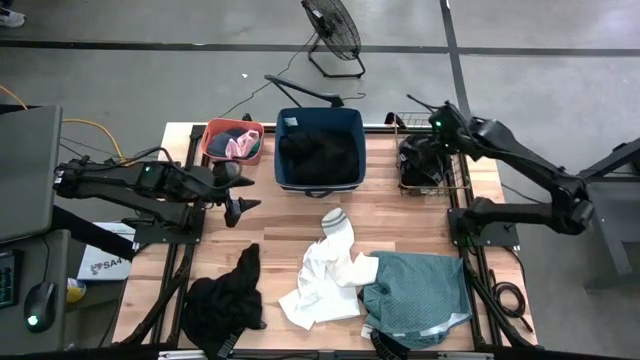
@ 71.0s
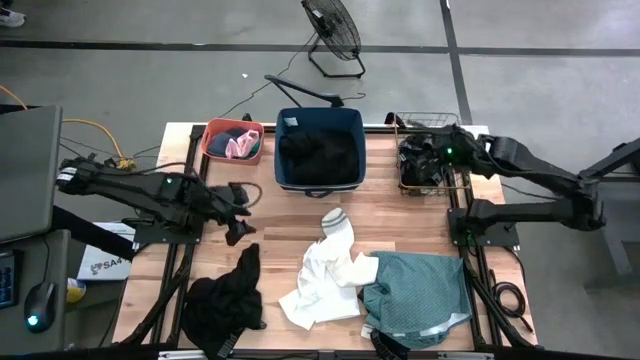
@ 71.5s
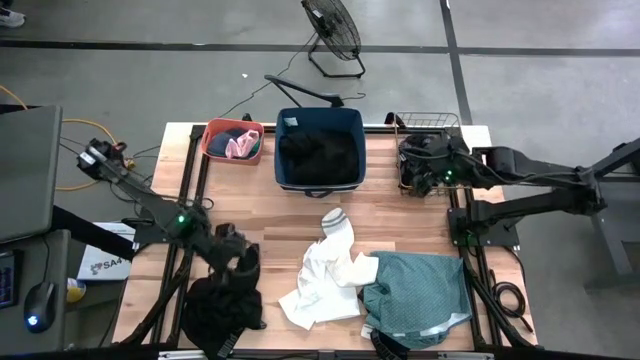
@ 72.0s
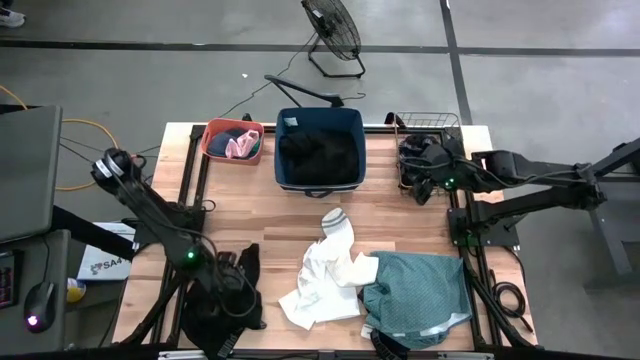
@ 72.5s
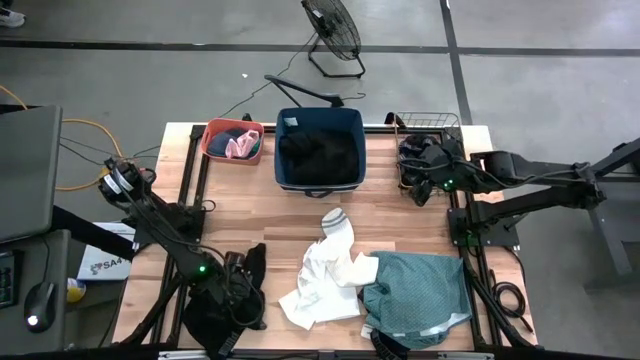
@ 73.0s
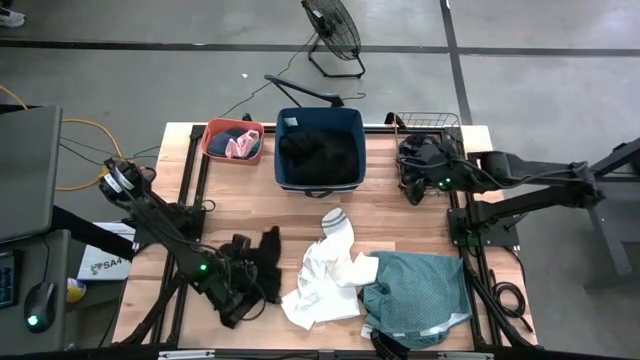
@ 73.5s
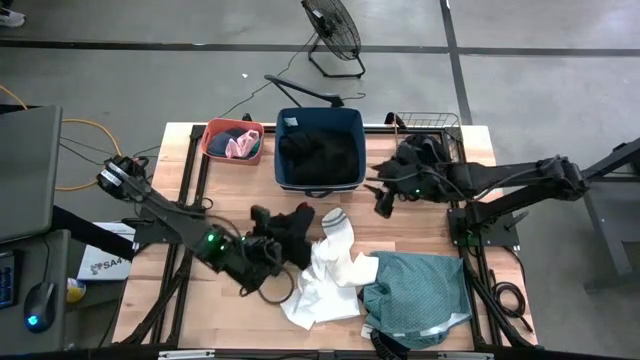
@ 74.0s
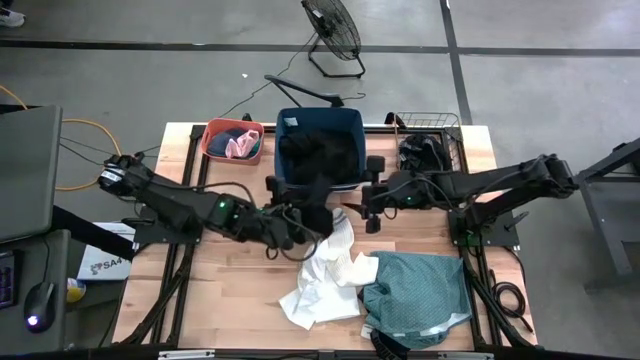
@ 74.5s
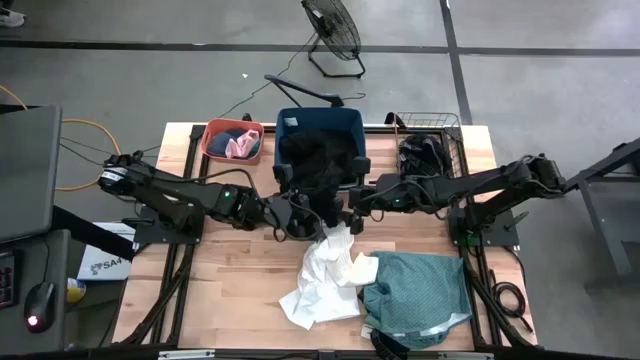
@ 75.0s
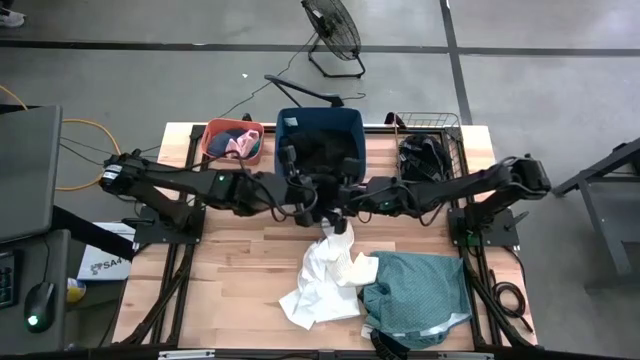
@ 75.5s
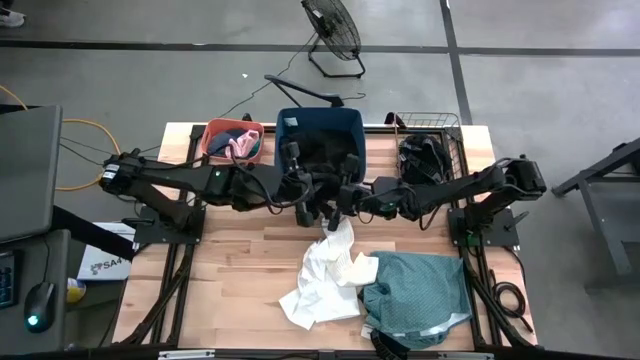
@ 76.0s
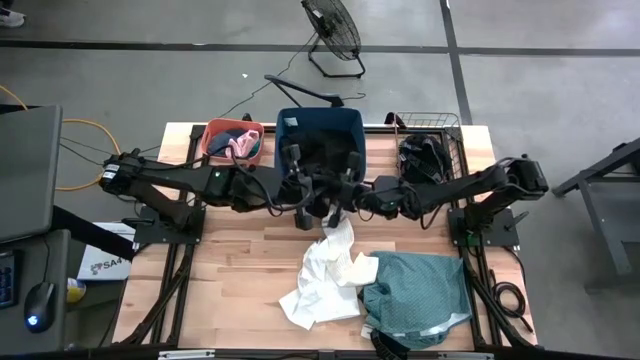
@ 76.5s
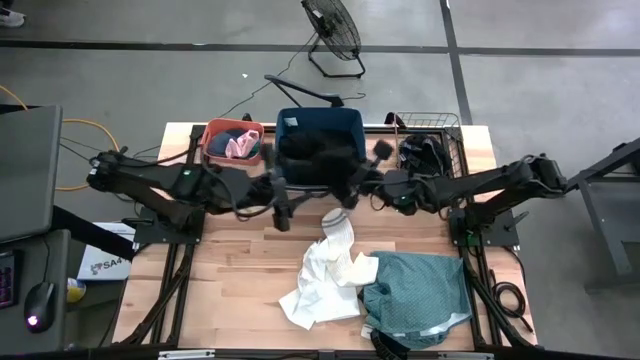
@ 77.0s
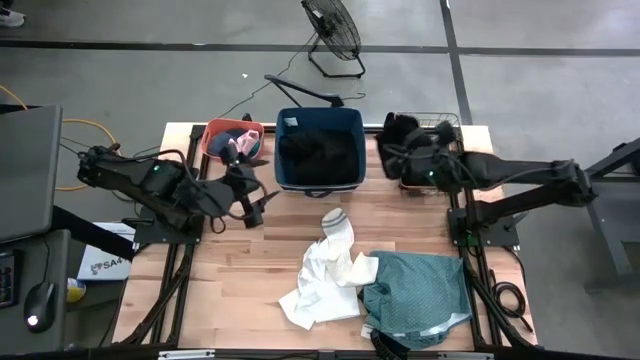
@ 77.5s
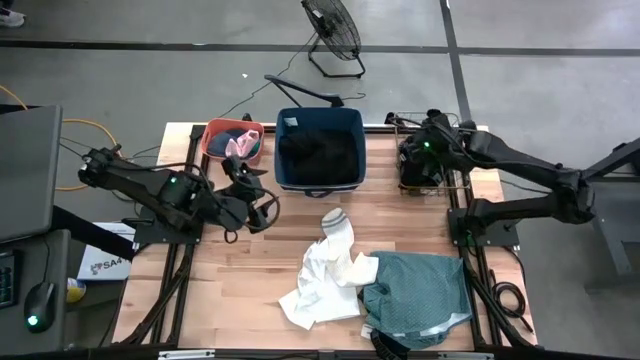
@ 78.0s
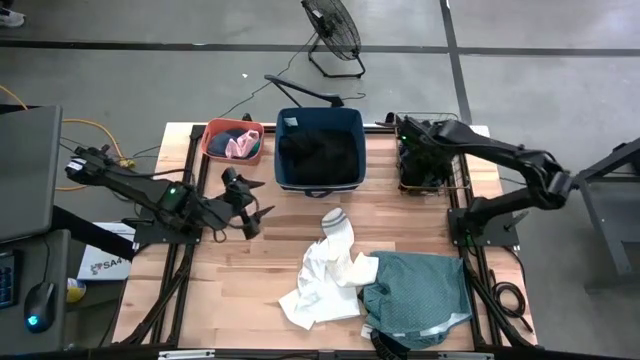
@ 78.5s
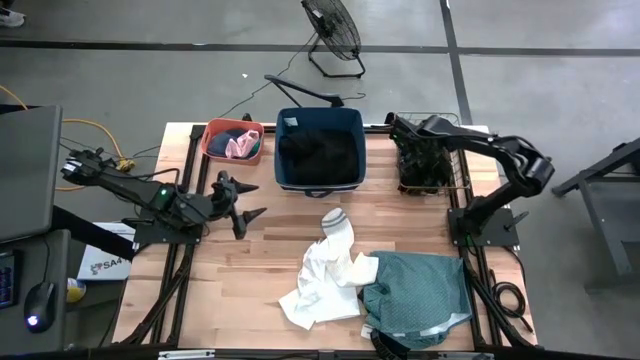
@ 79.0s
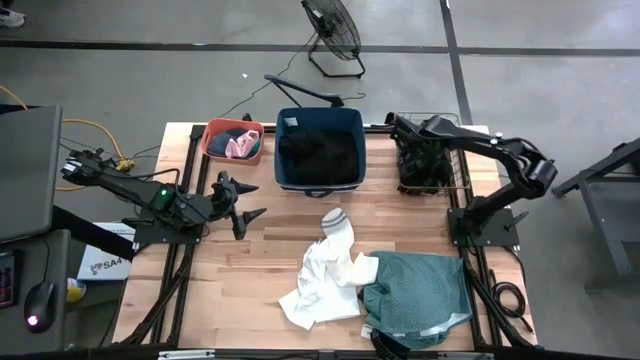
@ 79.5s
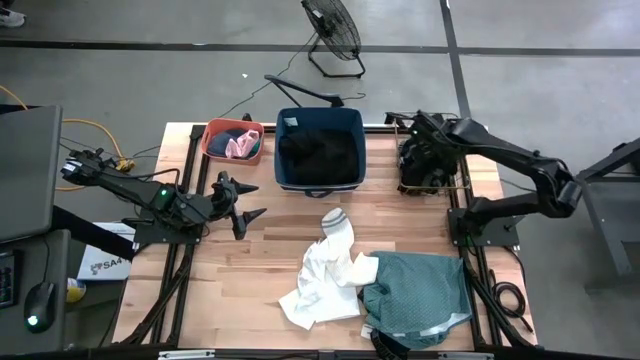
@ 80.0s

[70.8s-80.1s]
Task: Pick & Place Cloths
Put the left black boxer into the wire basket

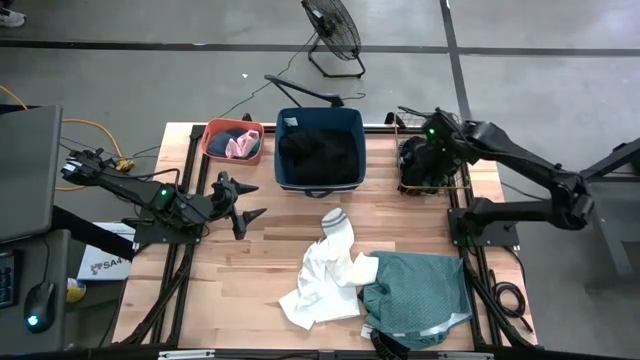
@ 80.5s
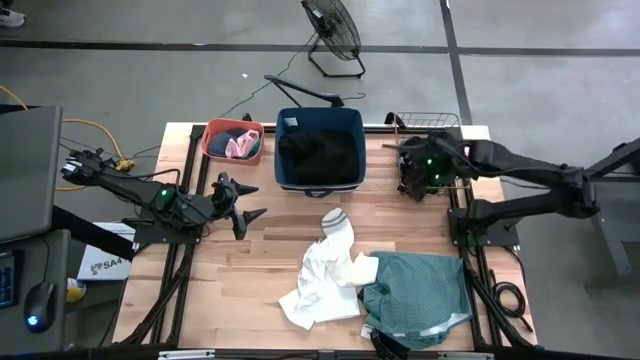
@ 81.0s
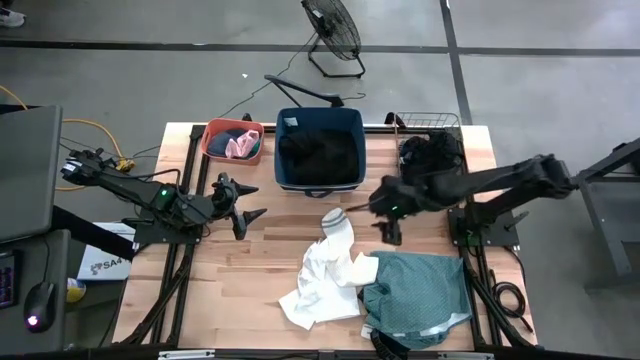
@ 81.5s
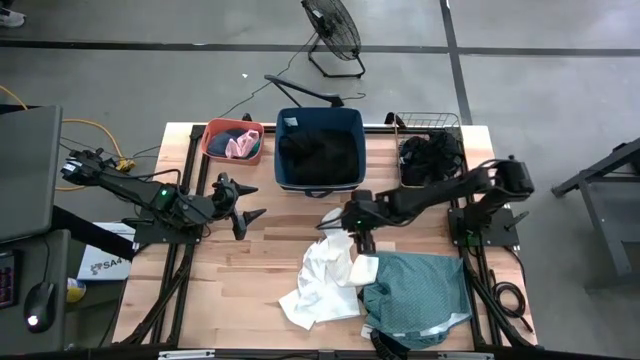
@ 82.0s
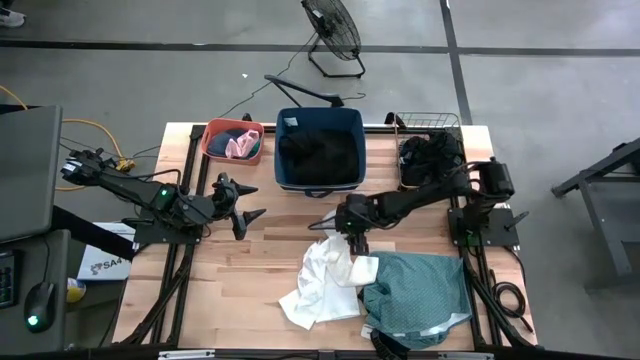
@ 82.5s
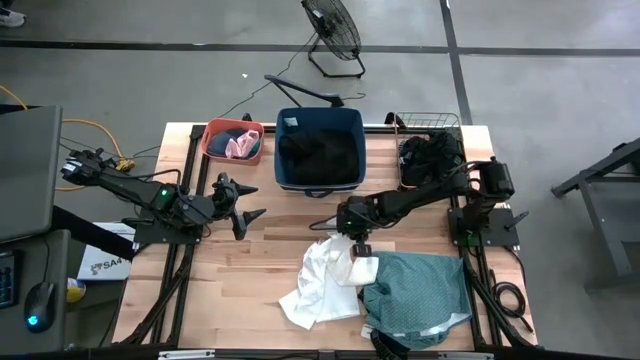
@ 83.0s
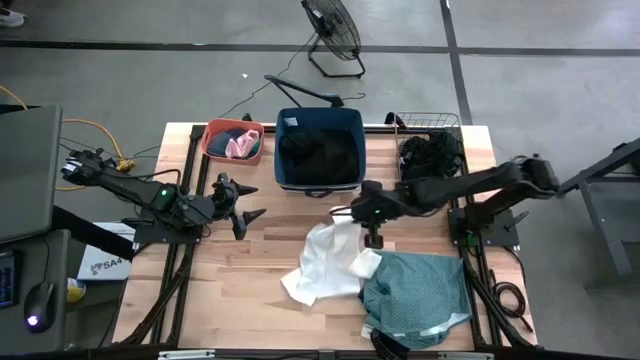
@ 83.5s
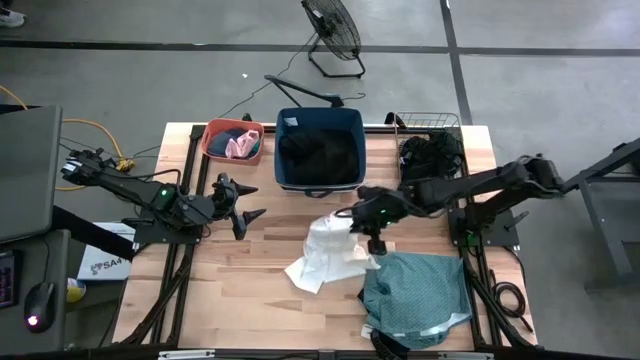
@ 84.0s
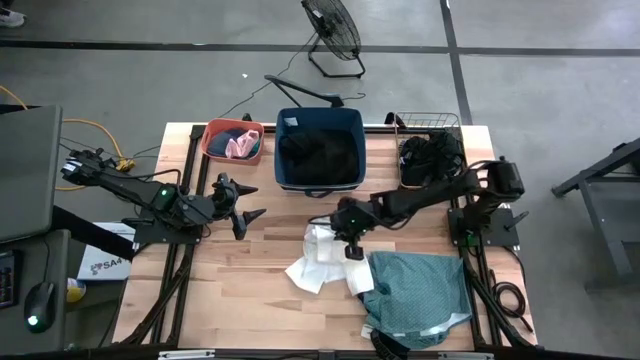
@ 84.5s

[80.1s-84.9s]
Put the white sock into the orange bin

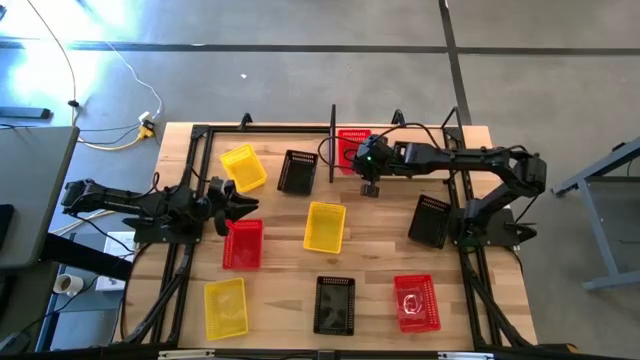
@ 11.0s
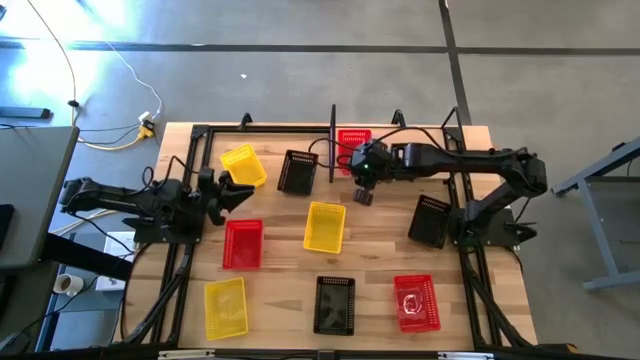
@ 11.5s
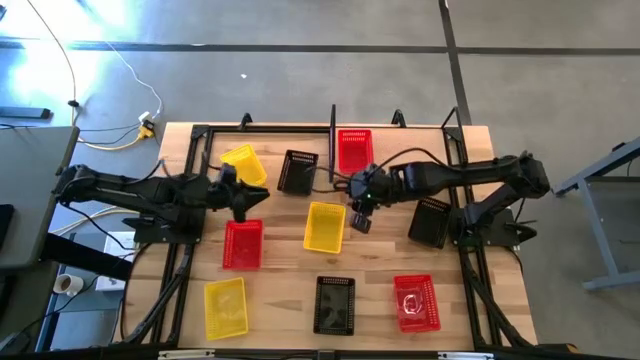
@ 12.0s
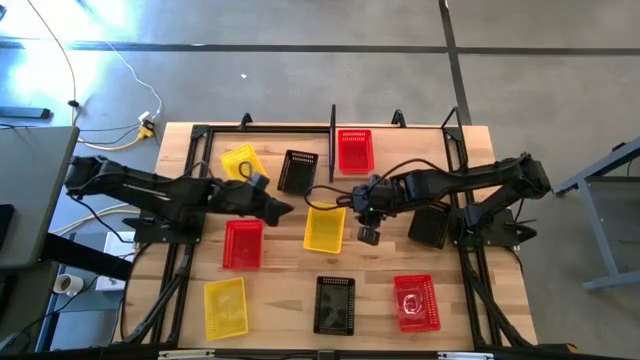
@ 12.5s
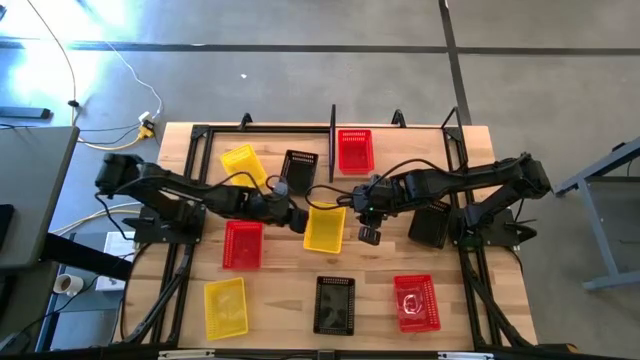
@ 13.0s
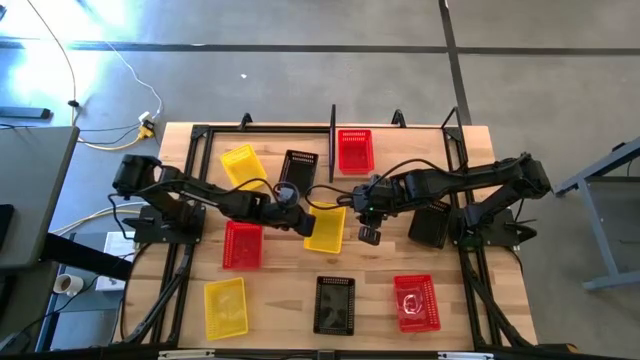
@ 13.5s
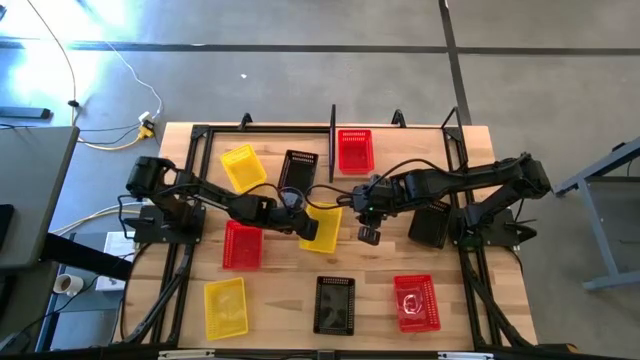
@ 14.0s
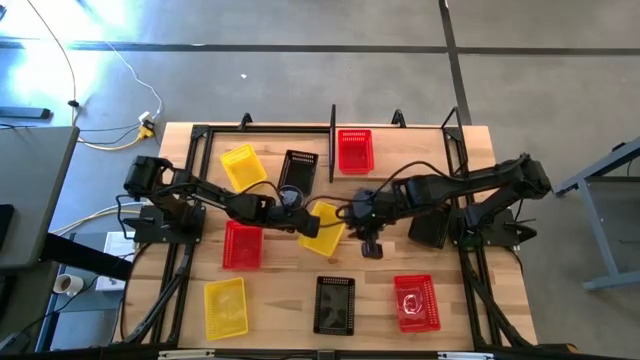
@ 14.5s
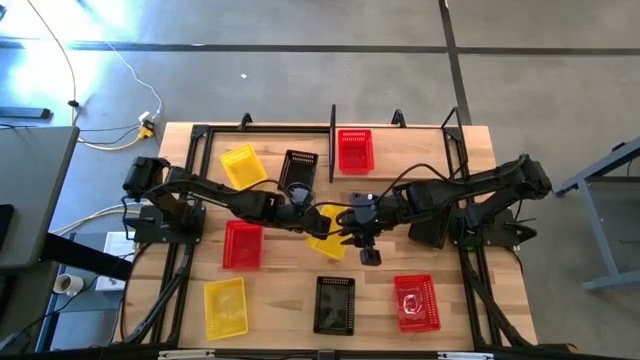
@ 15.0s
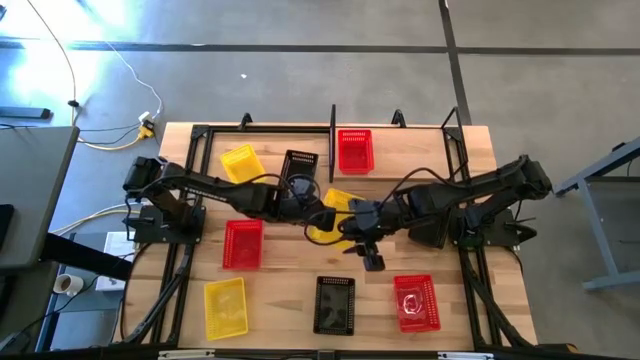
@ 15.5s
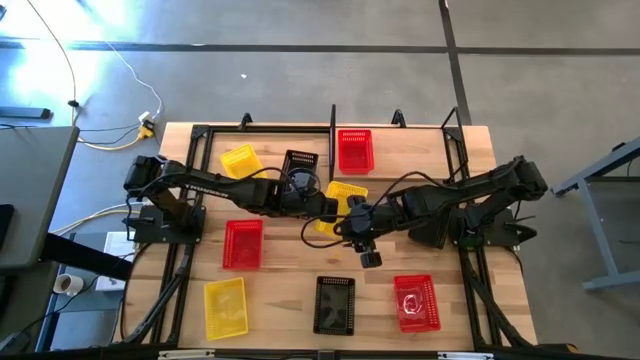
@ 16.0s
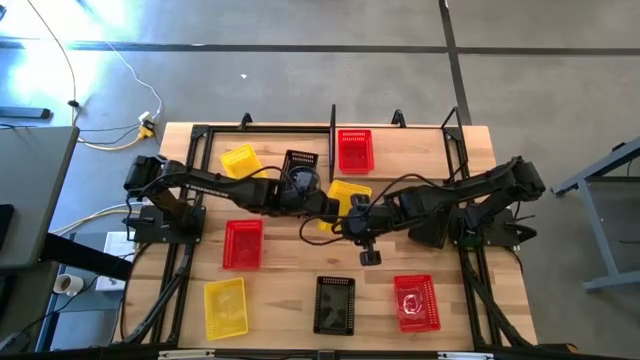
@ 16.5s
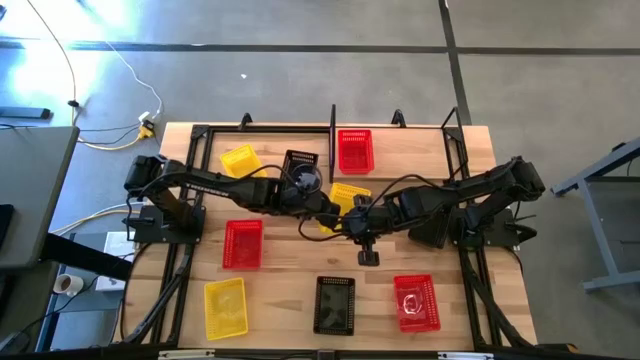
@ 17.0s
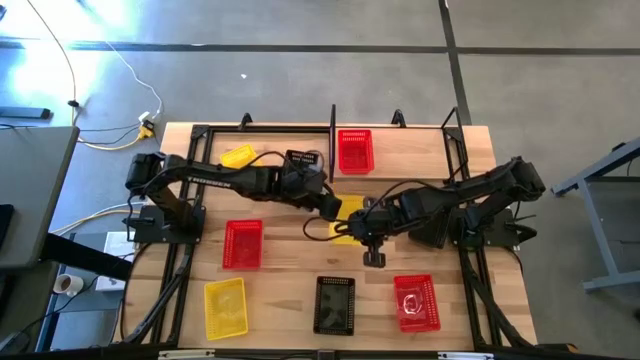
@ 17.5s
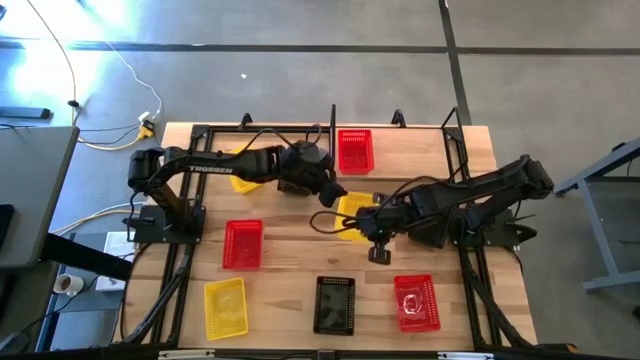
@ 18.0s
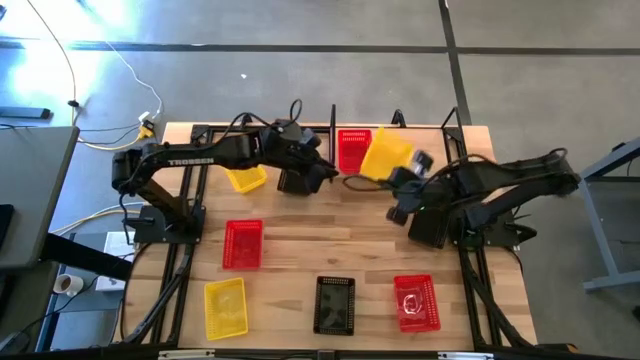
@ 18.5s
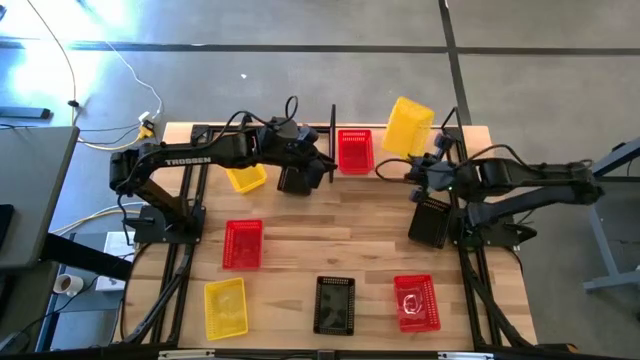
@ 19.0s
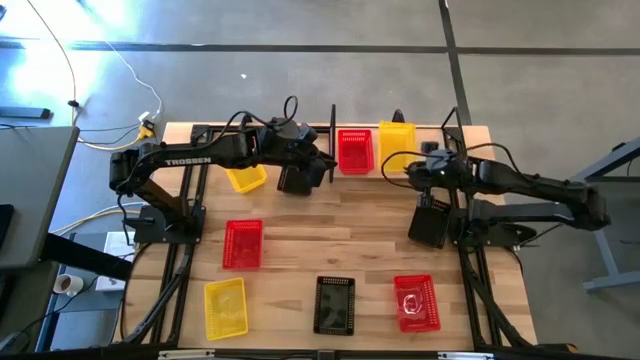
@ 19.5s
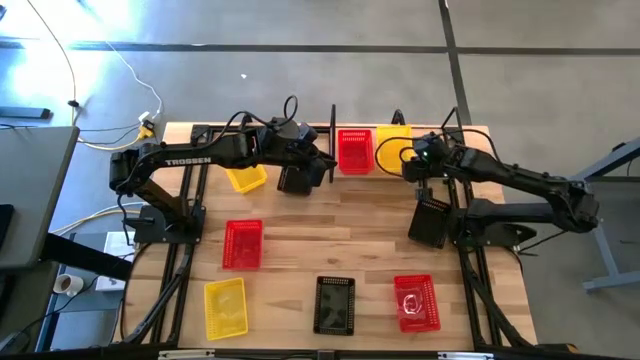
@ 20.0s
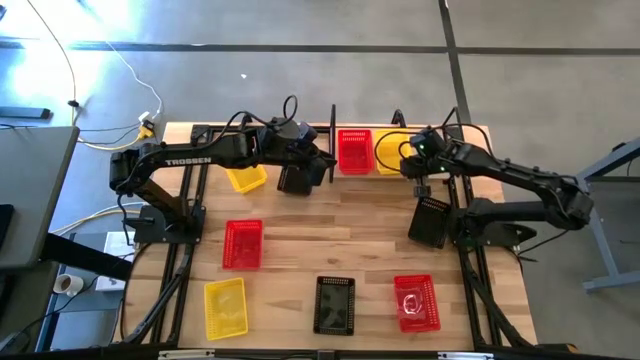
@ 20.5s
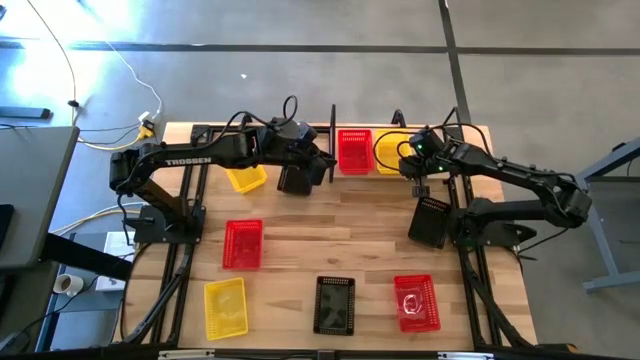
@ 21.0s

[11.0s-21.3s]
Task: Stack baskets on shelf by color
Put the right yellow bin on the shelf
